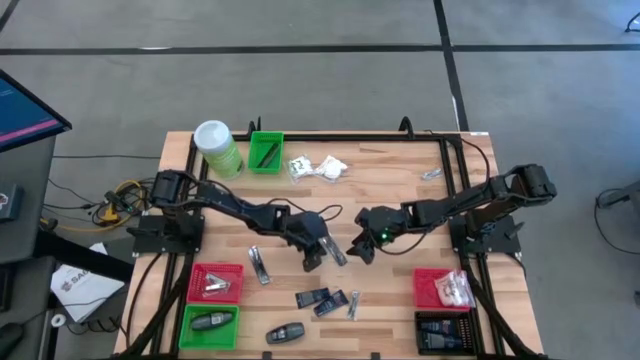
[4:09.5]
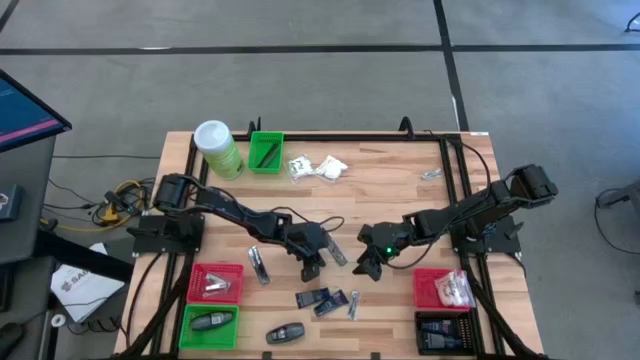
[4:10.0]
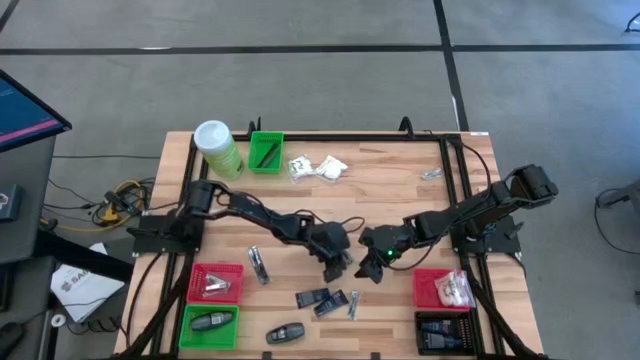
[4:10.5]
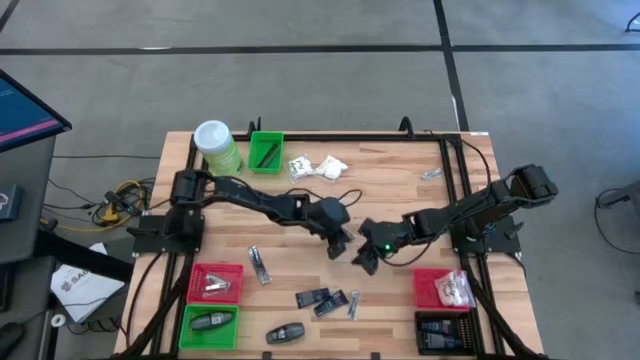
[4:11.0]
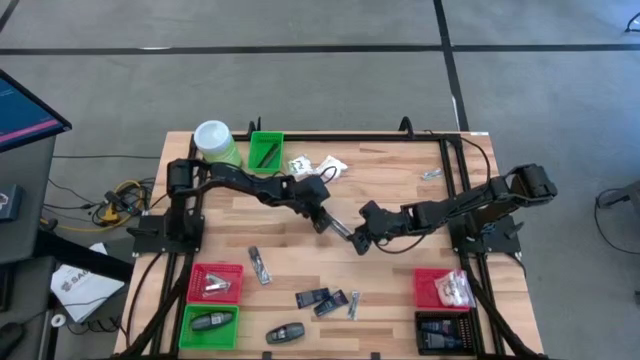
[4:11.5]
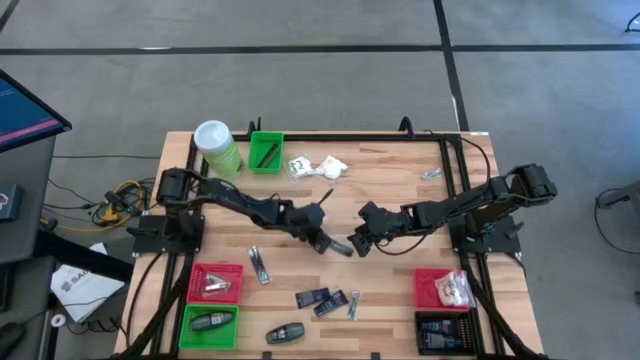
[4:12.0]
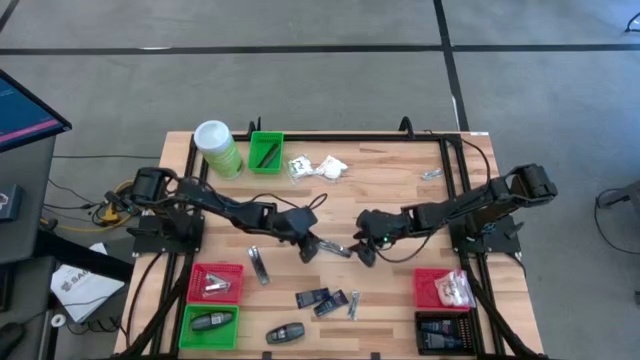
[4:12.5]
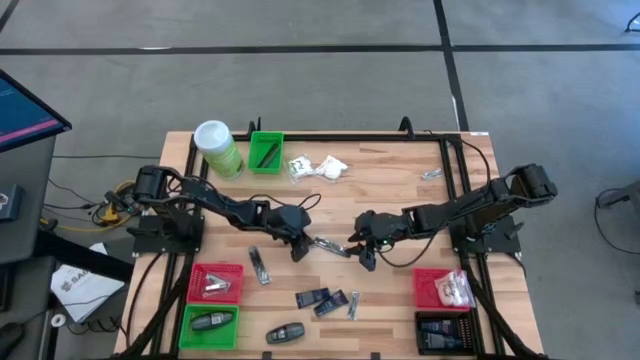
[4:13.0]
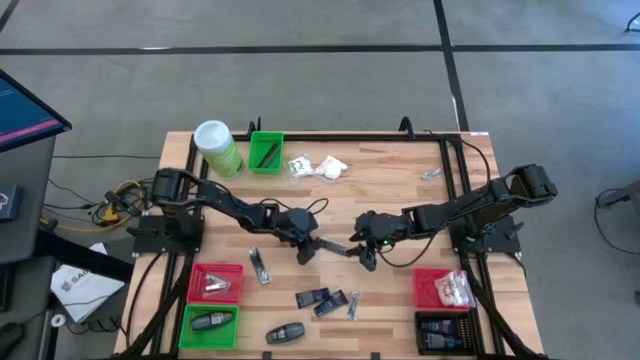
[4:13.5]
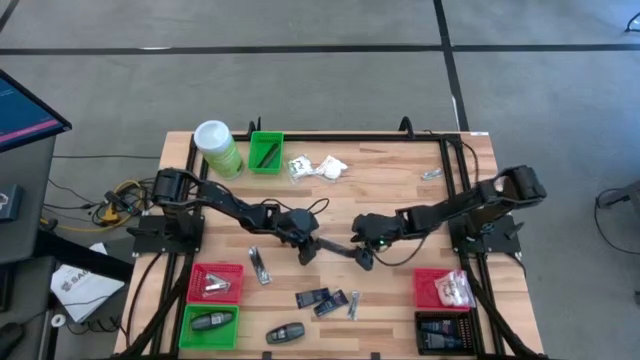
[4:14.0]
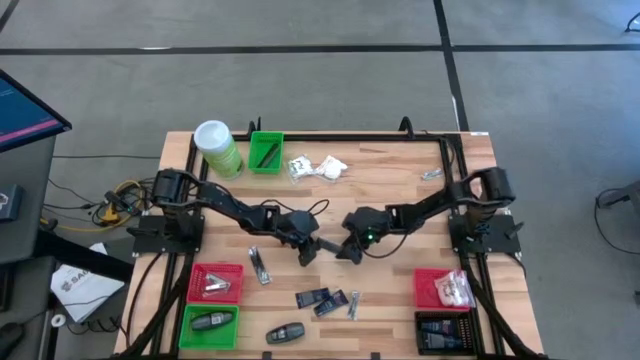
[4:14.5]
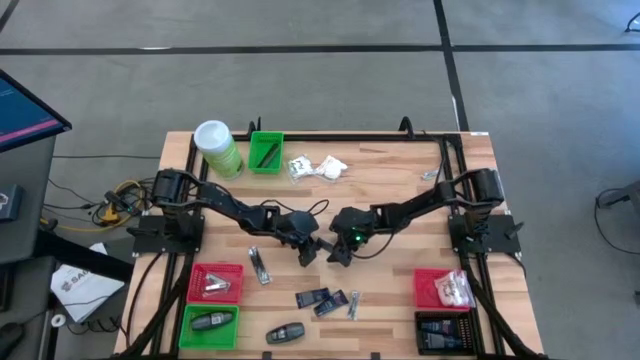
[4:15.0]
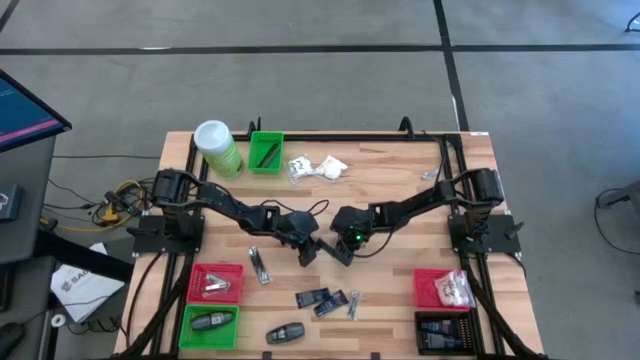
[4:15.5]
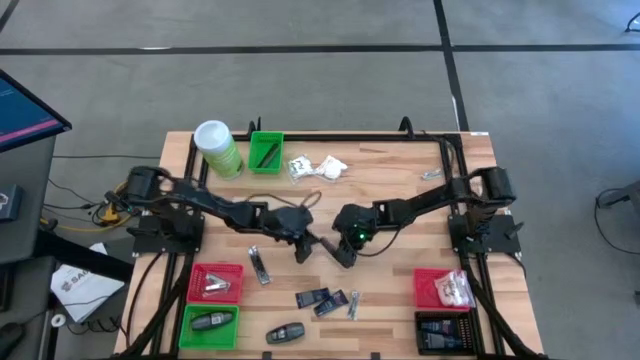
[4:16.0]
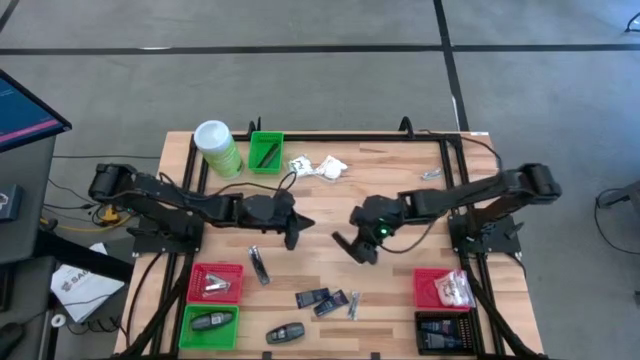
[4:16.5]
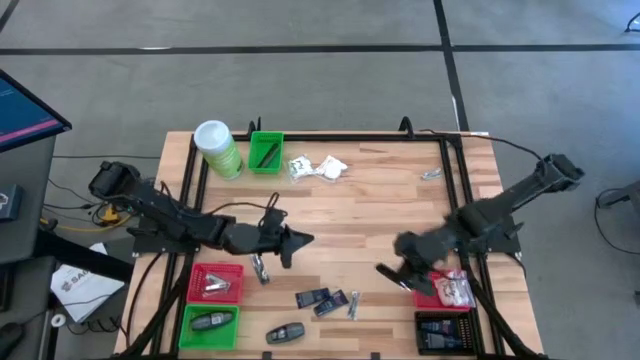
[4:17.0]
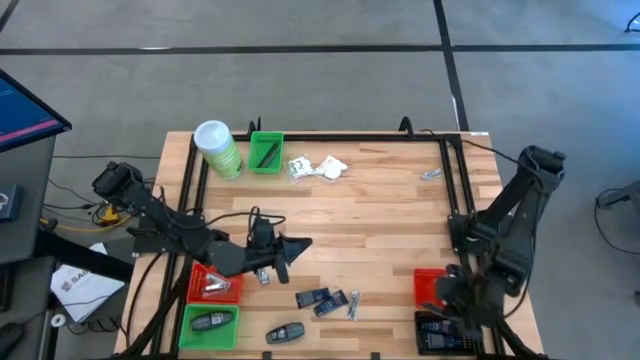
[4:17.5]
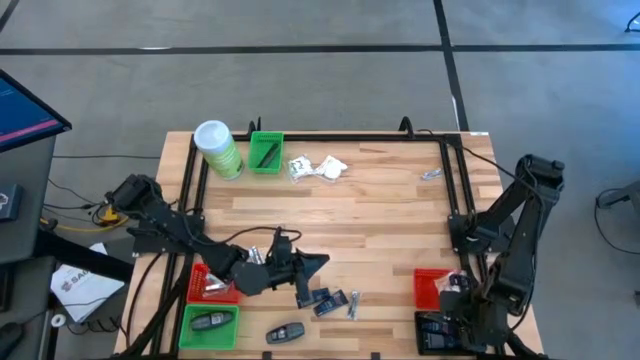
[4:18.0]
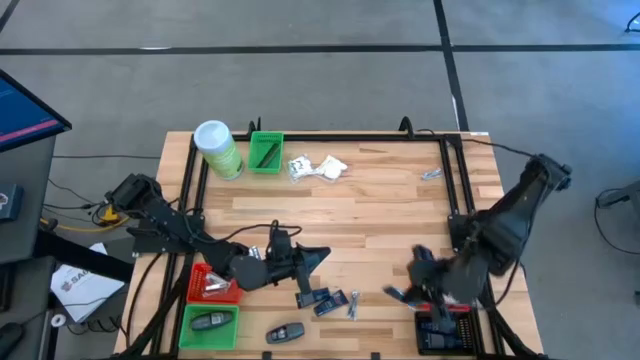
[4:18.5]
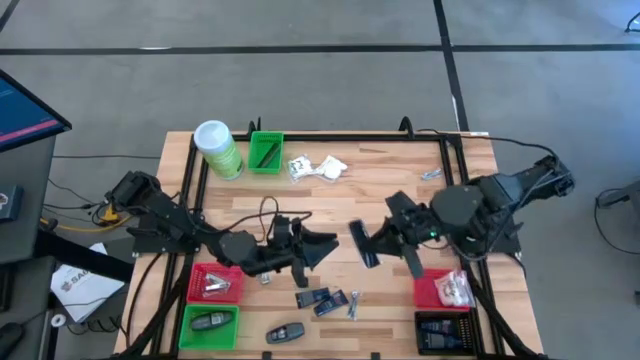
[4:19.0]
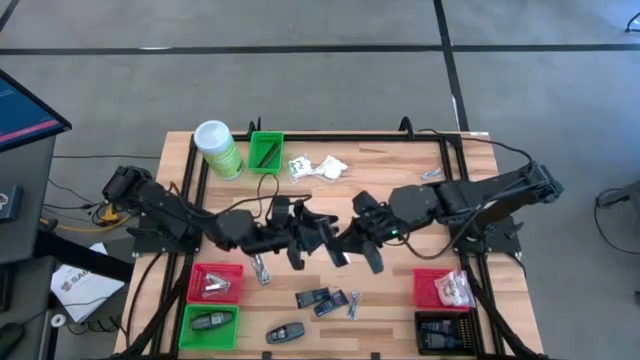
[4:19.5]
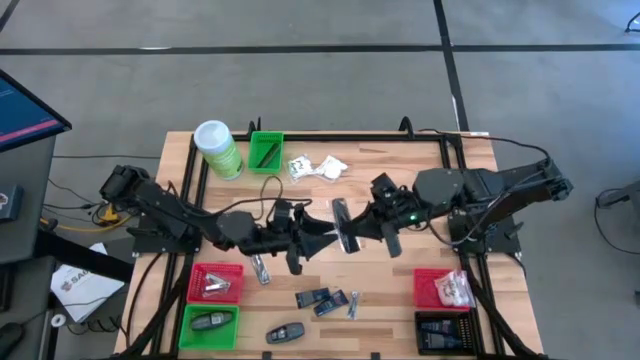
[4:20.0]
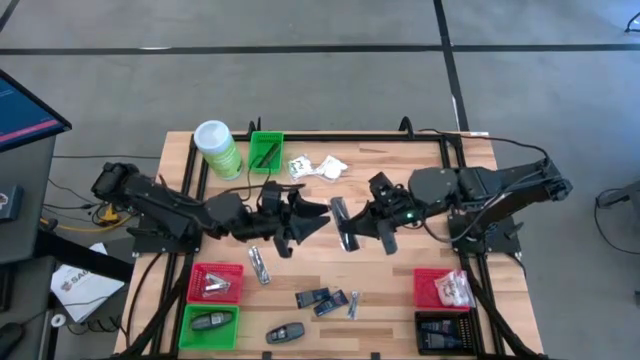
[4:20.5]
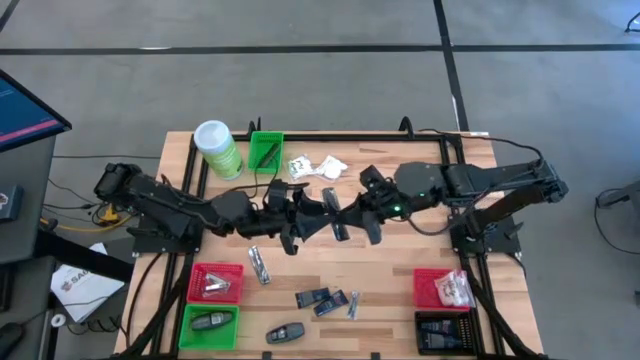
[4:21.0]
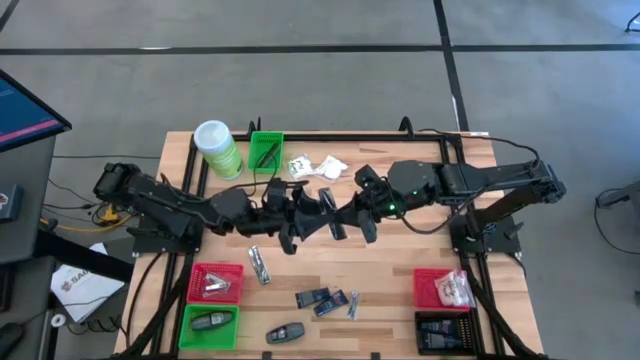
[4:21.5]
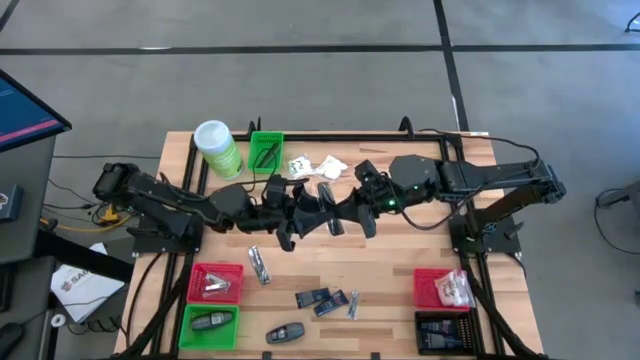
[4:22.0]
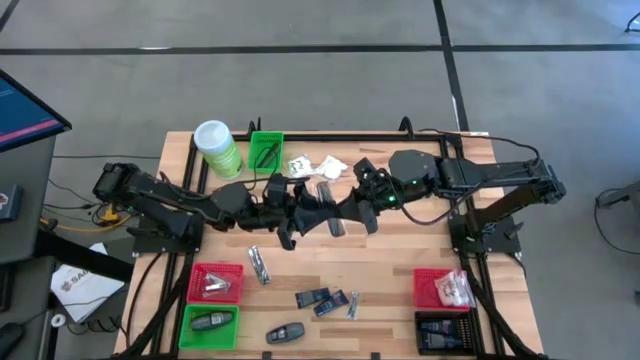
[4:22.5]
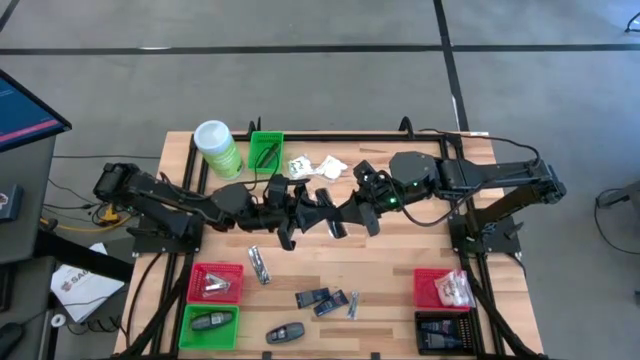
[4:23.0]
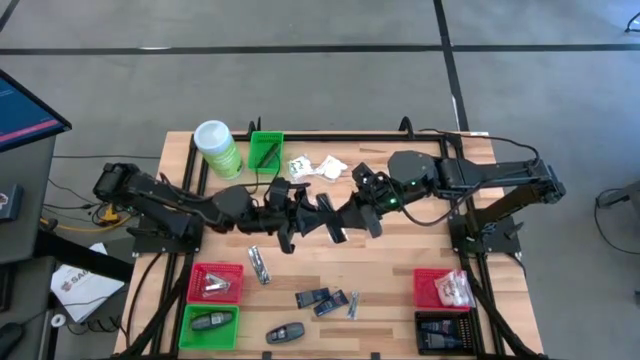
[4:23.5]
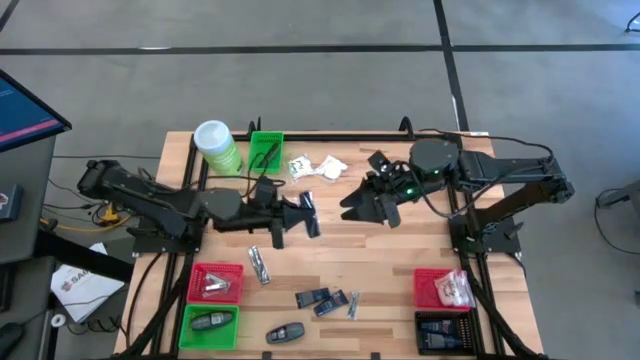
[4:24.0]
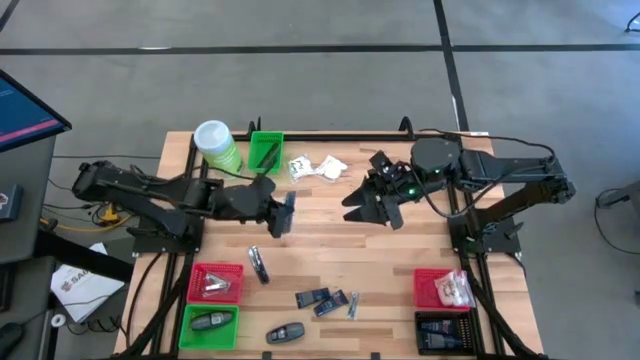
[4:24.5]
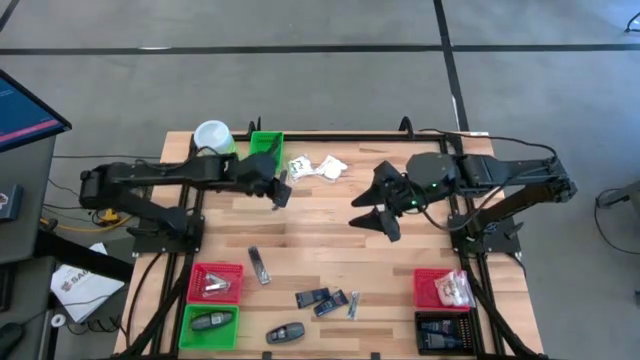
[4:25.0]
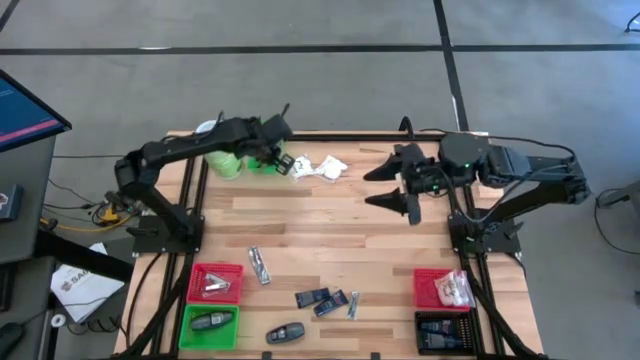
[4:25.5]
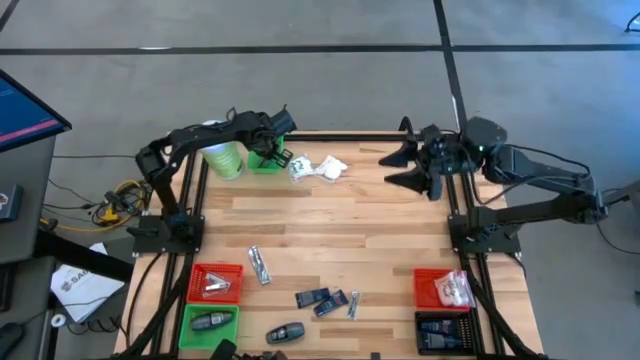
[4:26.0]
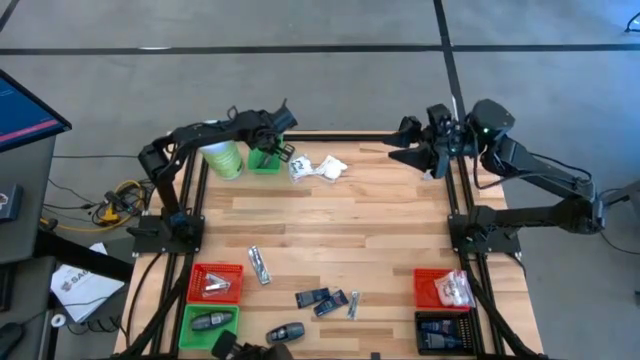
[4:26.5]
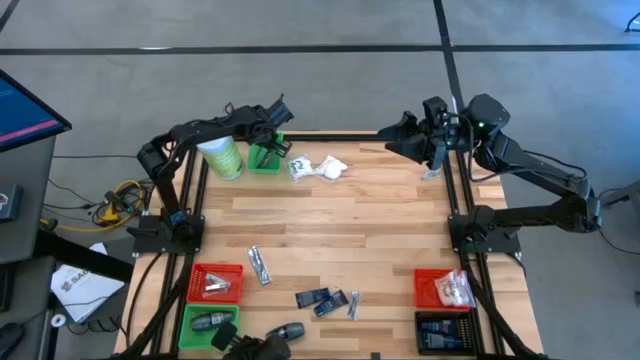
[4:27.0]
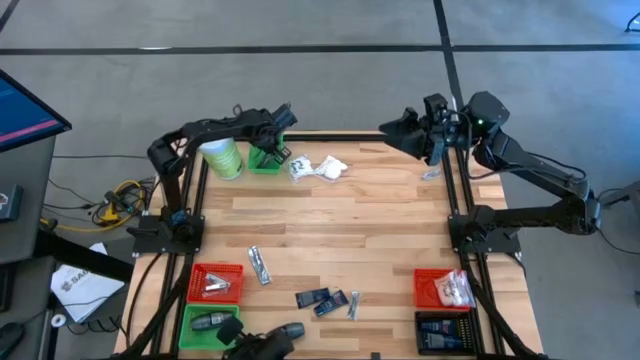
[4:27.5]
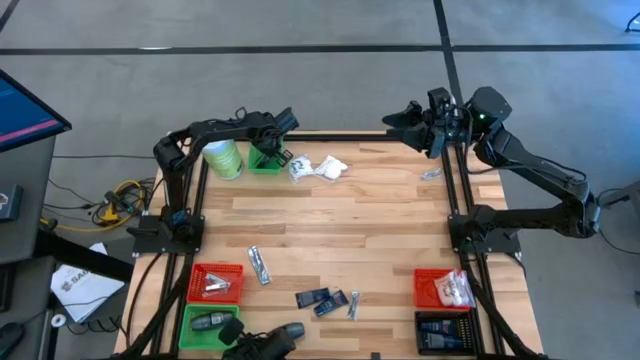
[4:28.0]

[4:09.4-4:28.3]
Task: Pick & Place Travel size toiletries
Put the black comb into the top green bin

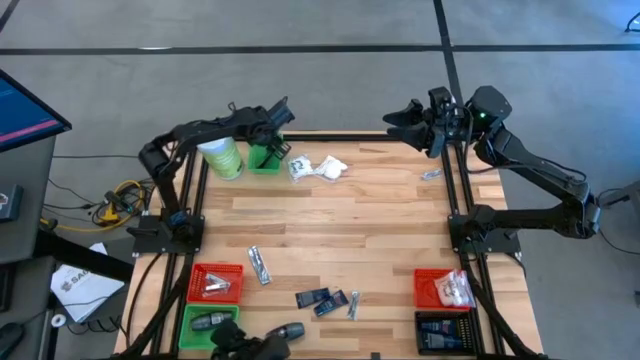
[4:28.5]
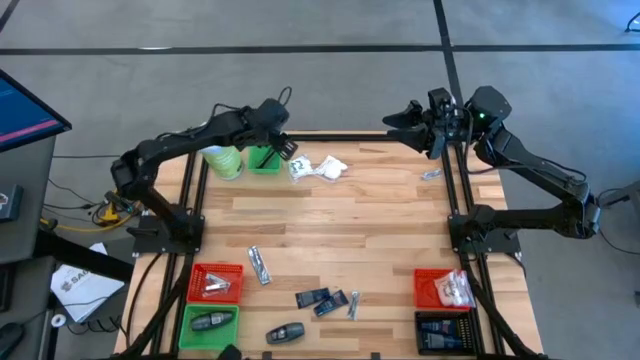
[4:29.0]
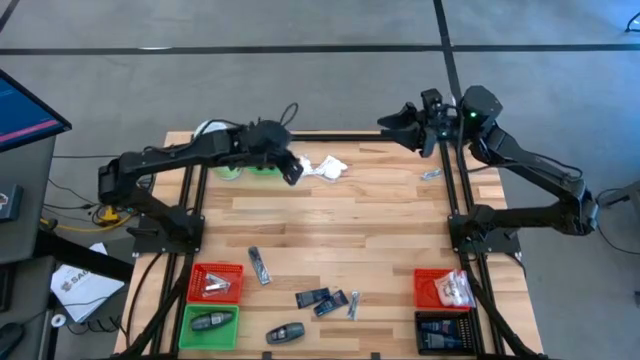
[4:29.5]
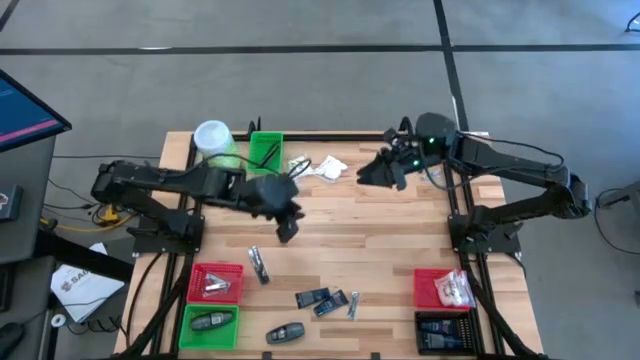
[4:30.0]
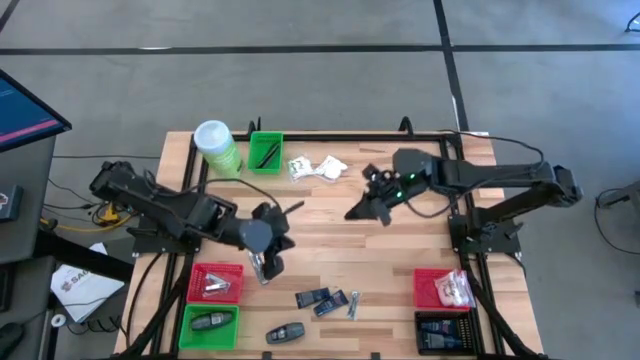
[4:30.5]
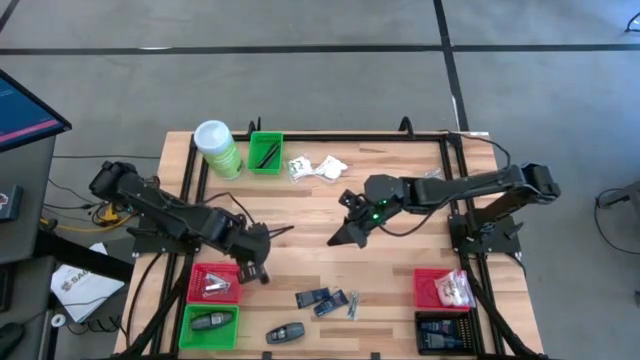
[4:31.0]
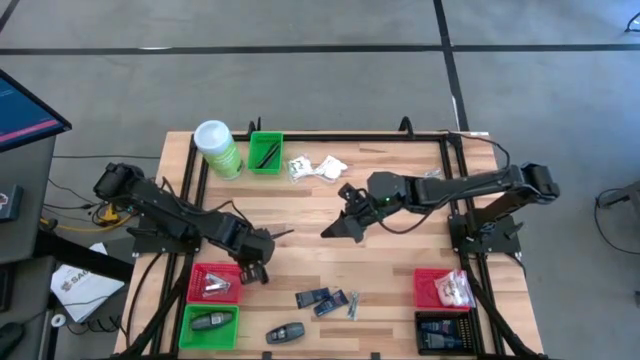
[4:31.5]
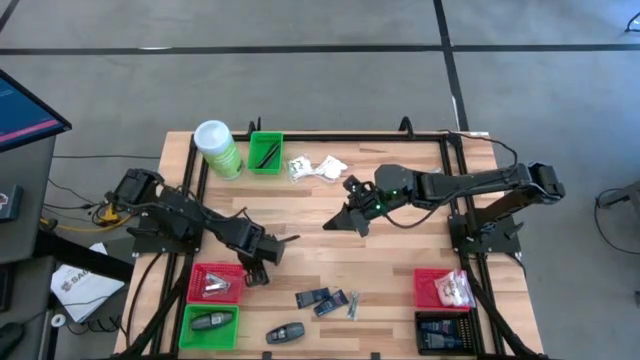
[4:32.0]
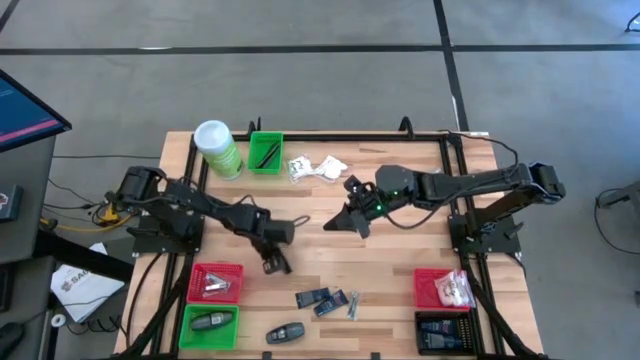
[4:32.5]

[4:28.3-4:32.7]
Adjust the black comb
